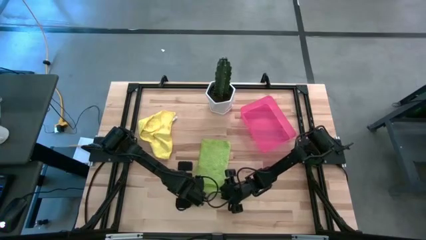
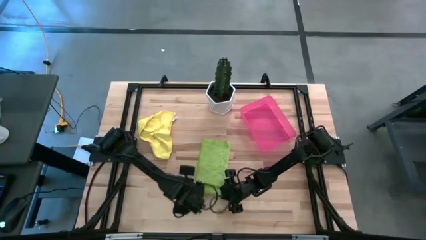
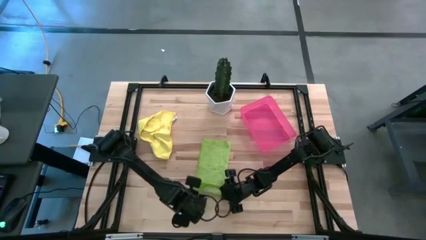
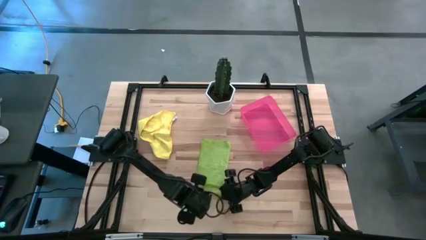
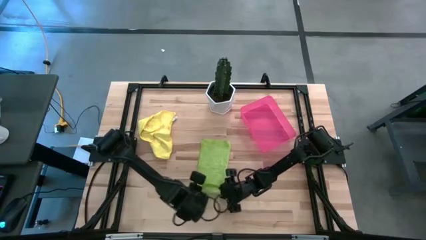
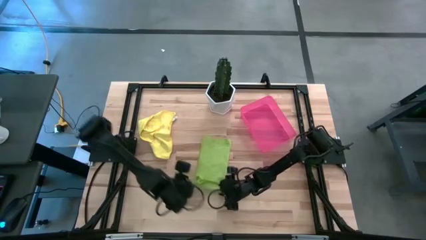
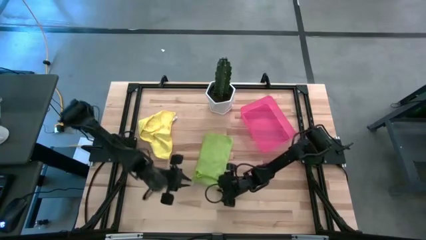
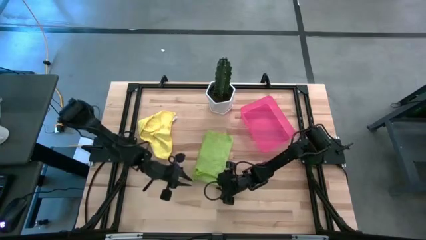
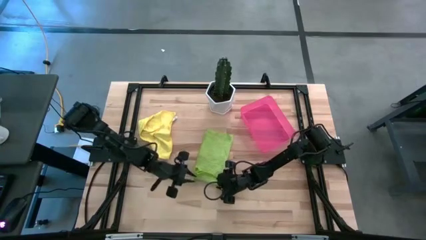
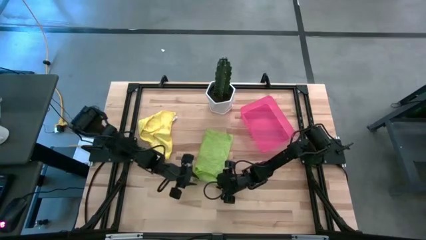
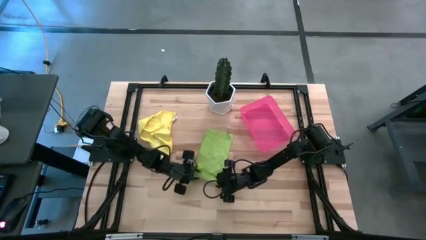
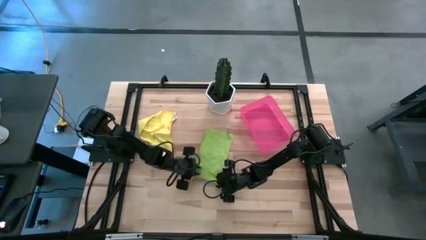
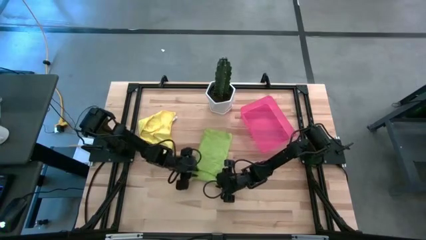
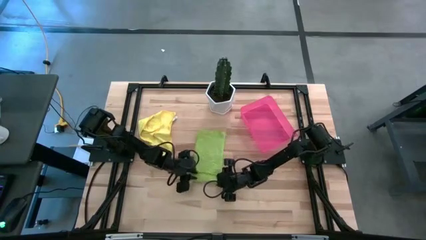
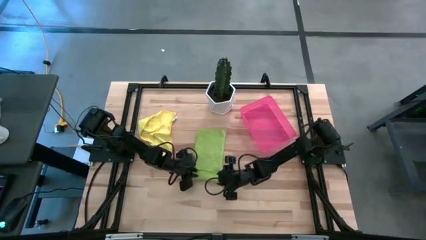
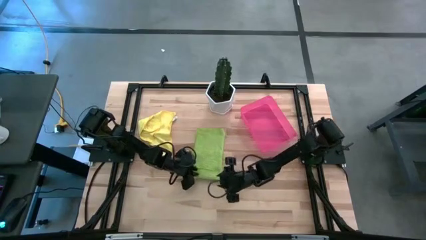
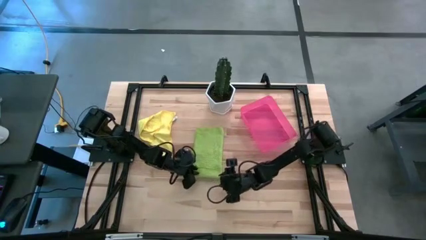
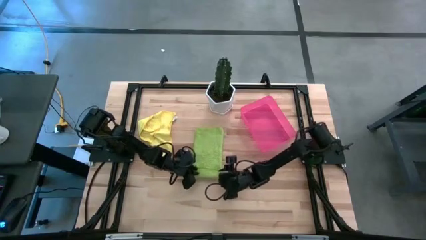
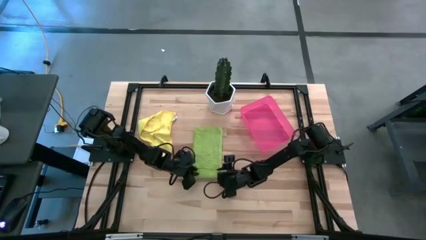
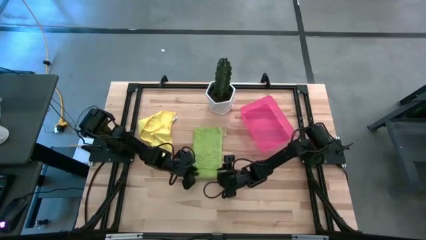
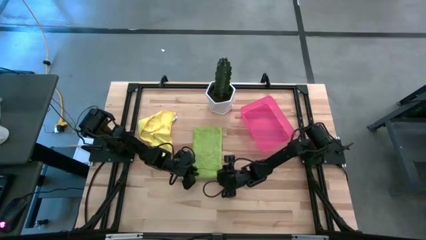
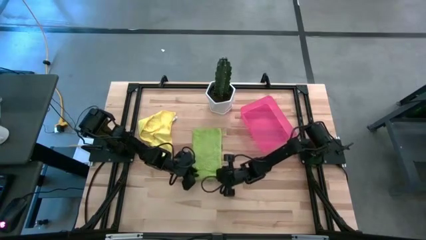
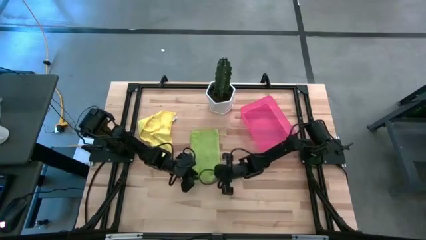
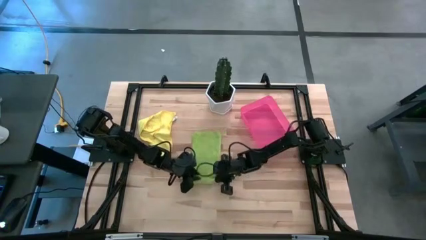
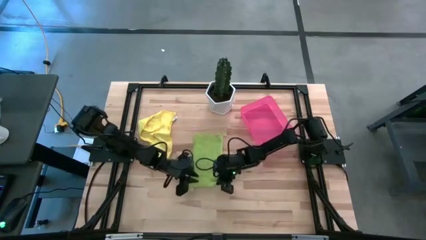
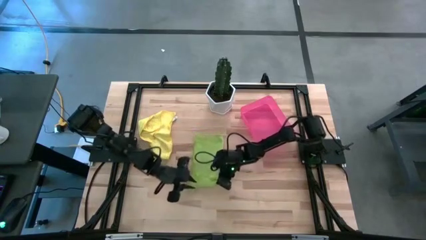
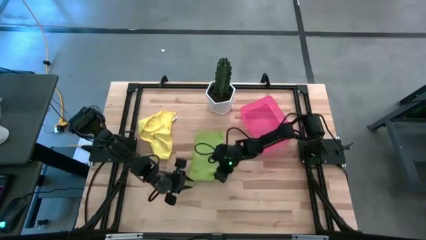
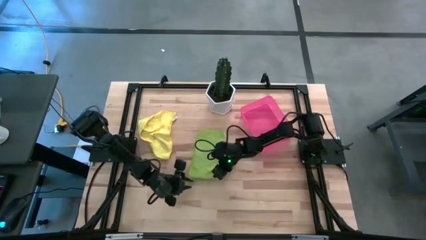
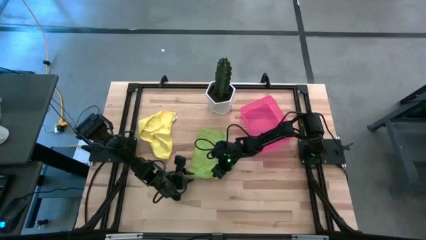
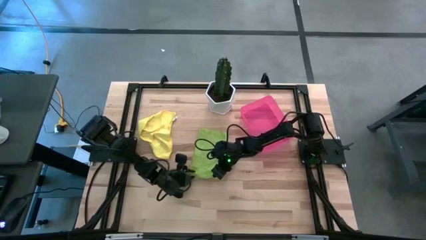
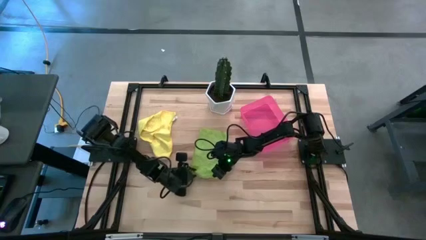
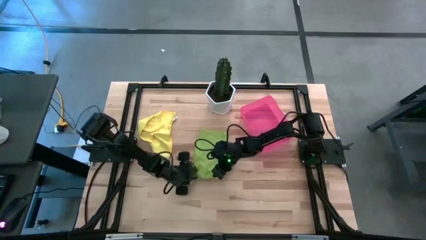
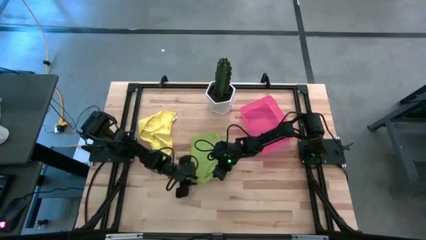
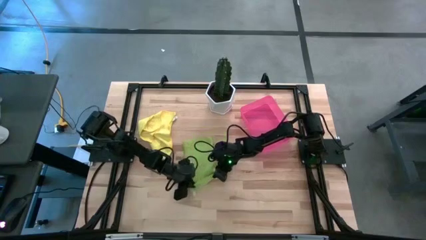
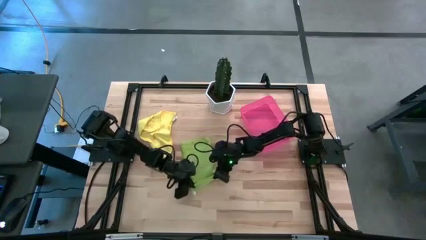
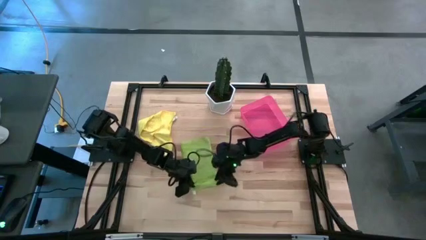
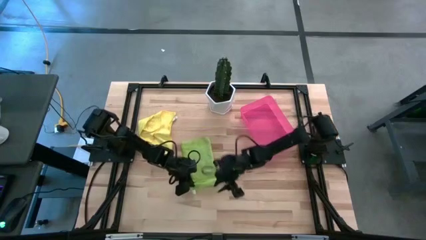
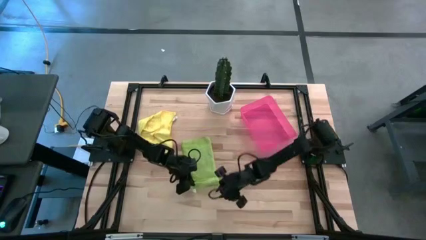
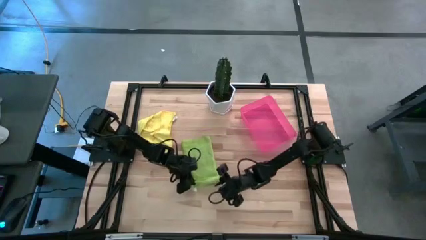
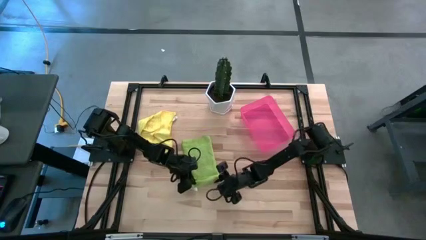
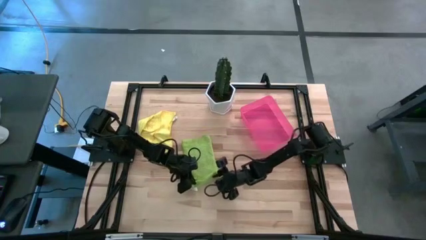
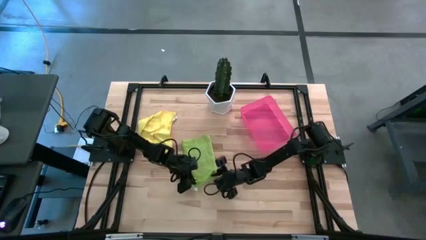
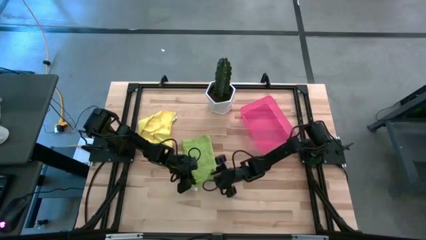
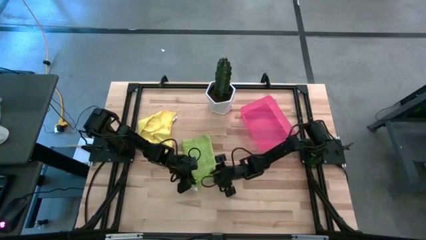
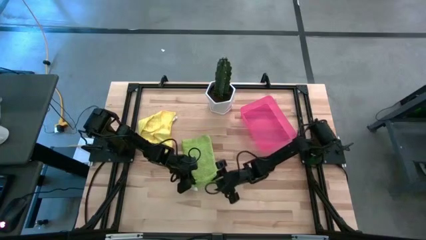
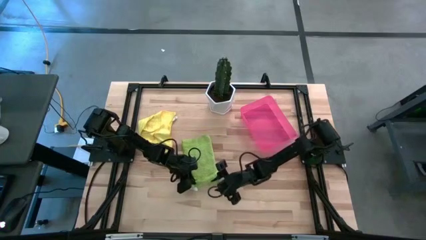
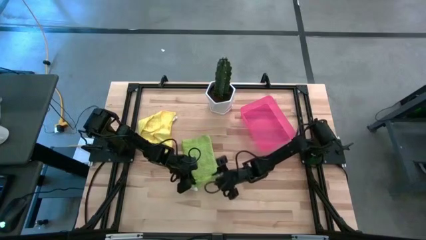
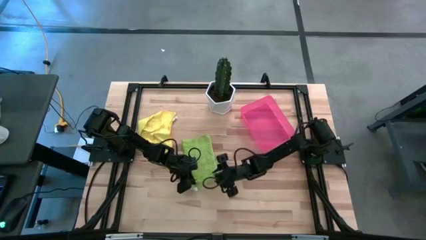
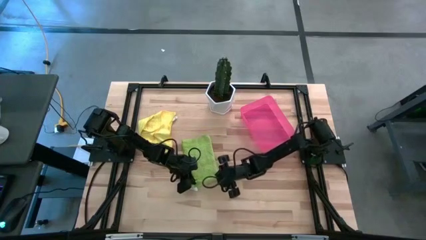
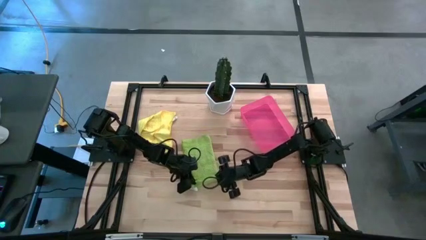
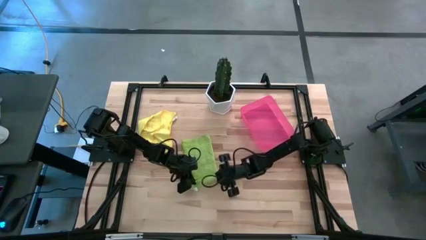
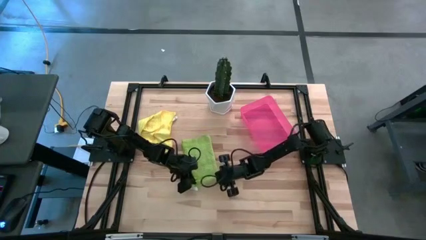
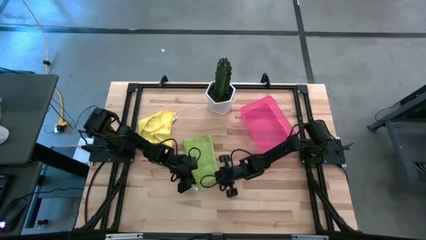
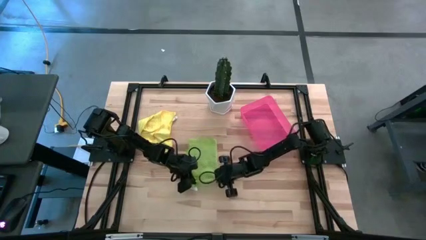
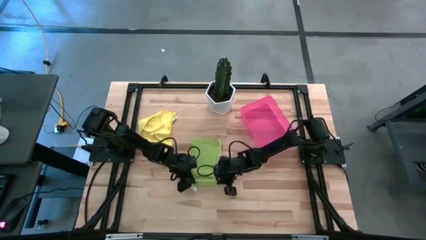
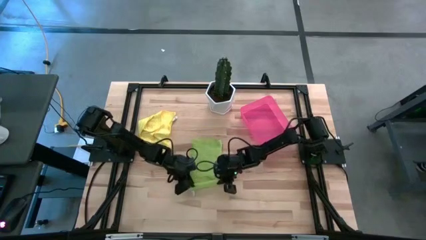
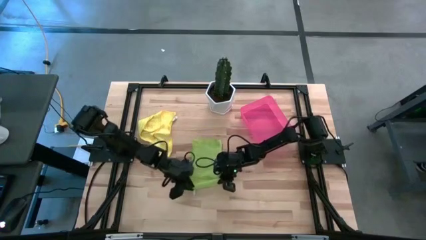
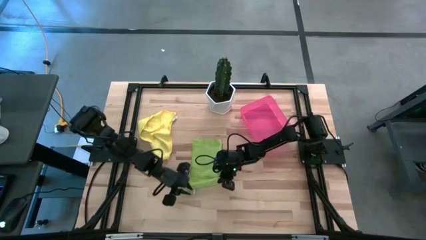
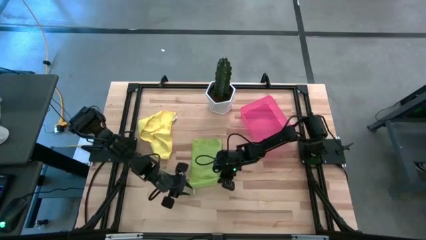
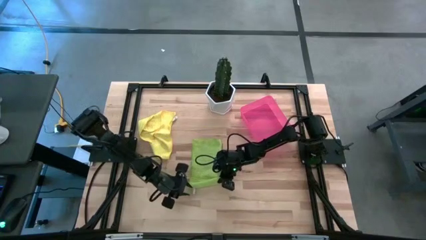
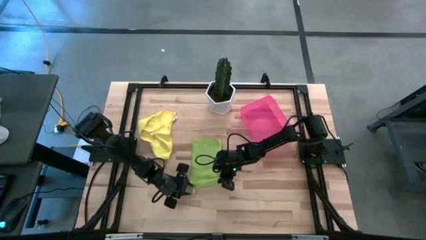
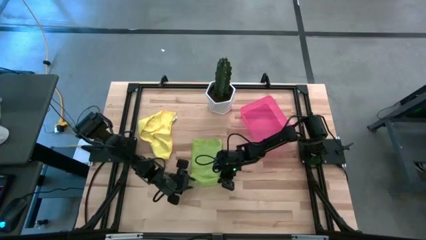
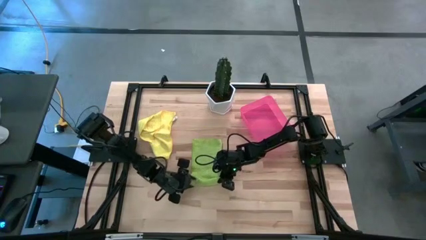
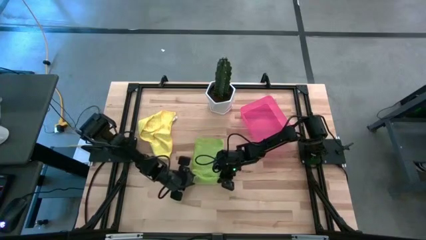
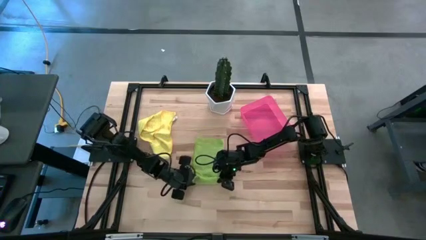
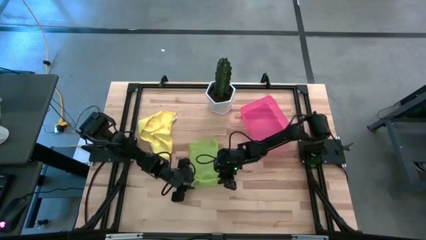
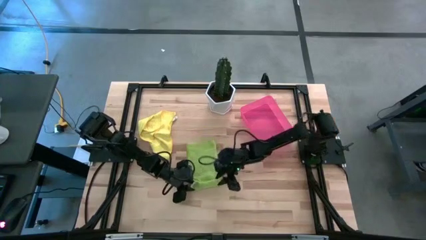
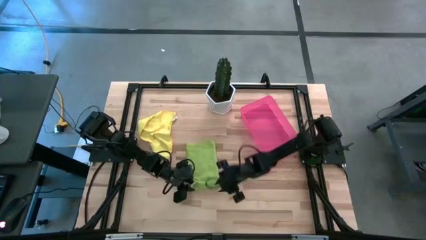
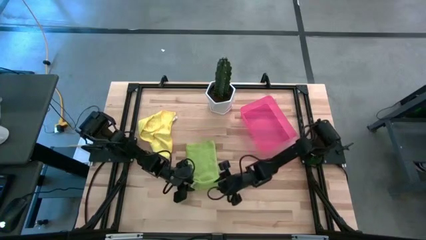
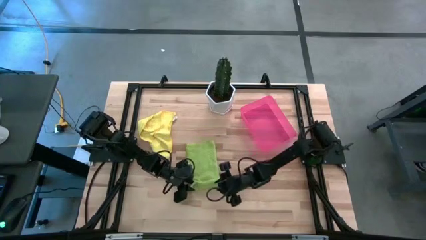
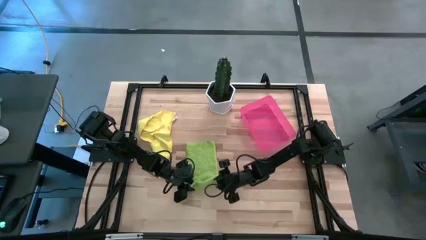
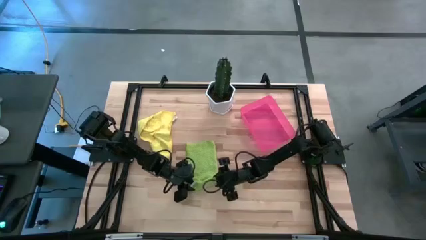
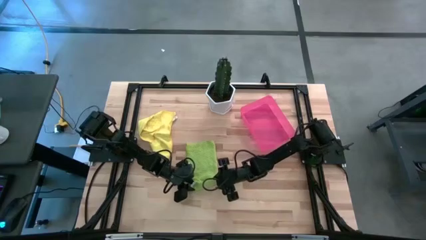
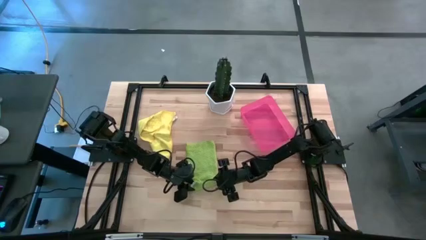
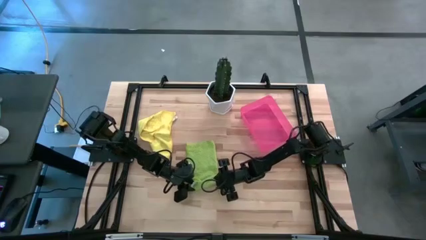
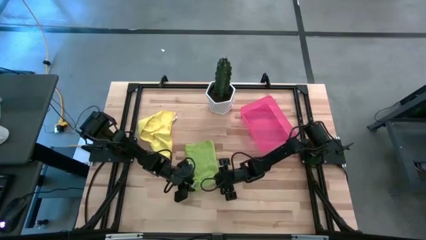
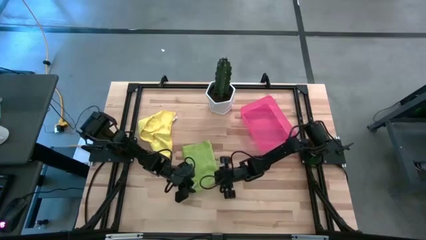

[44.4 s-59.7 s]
Task: Roll microfiber towels into tight, uniform cylinder then place into a basket
Roll the green towel
